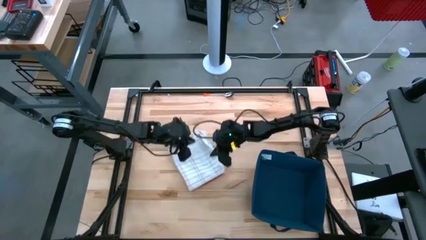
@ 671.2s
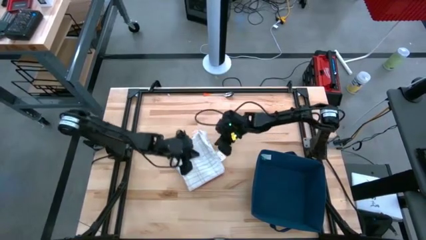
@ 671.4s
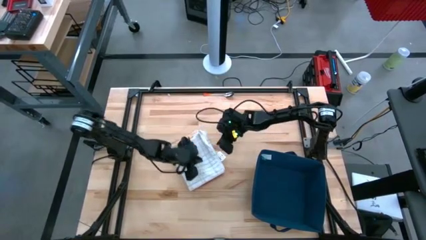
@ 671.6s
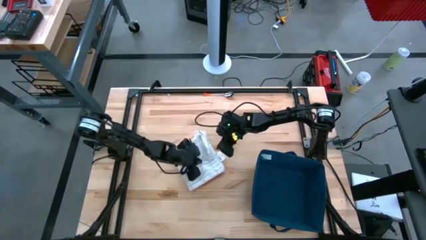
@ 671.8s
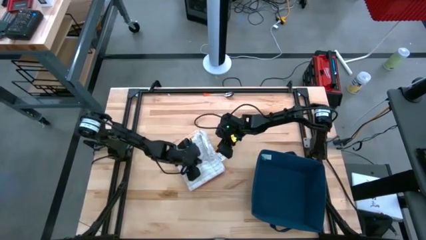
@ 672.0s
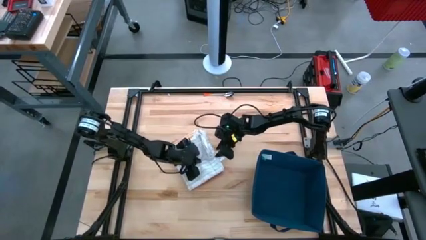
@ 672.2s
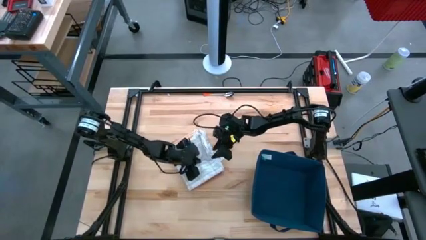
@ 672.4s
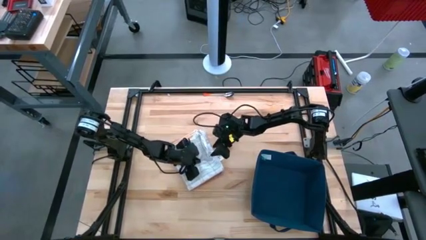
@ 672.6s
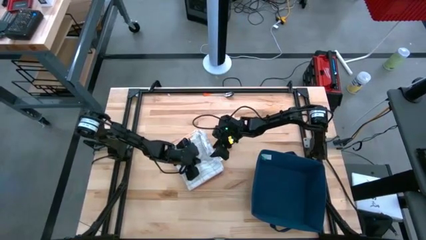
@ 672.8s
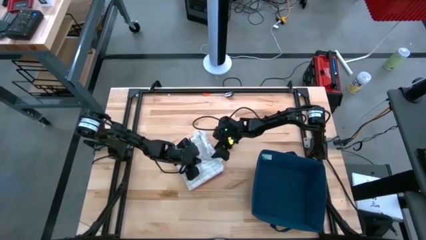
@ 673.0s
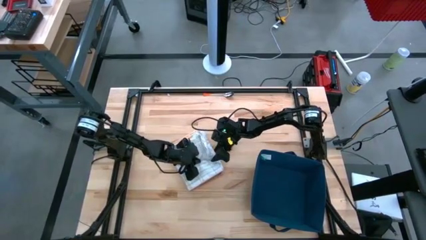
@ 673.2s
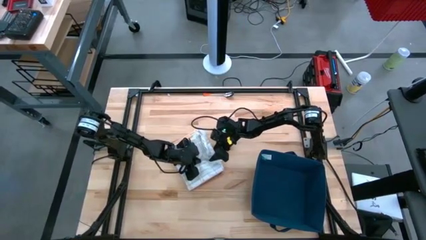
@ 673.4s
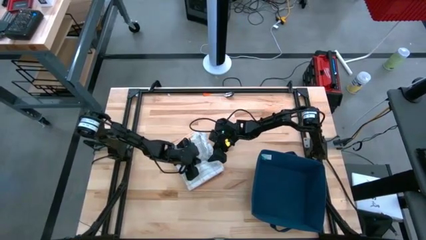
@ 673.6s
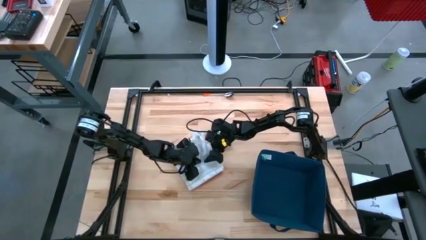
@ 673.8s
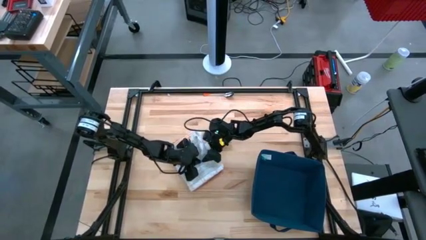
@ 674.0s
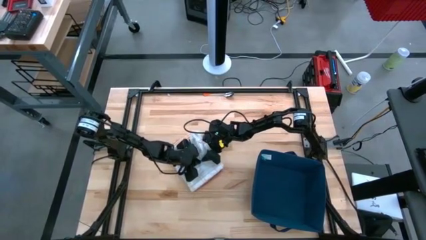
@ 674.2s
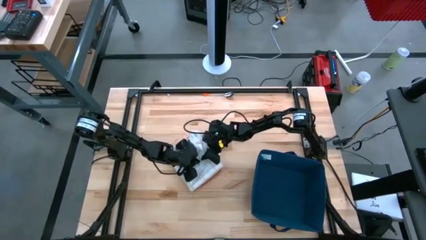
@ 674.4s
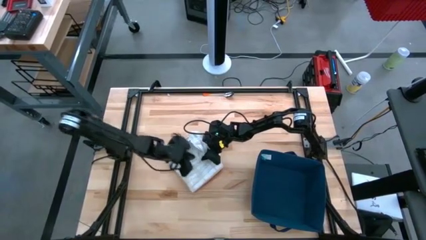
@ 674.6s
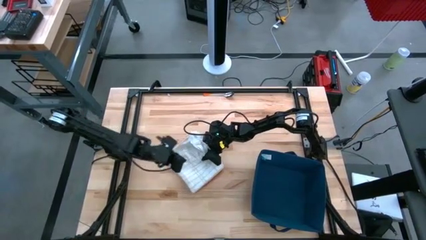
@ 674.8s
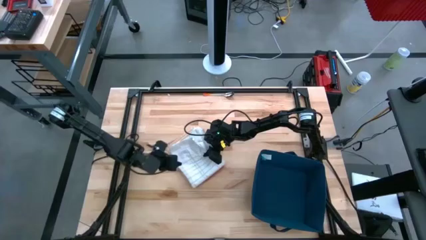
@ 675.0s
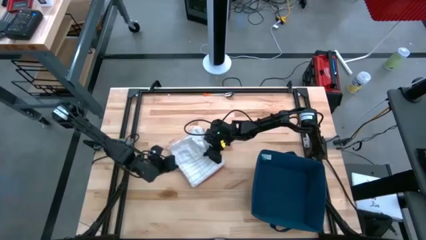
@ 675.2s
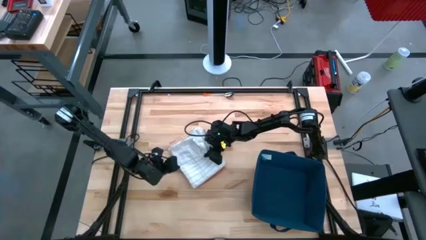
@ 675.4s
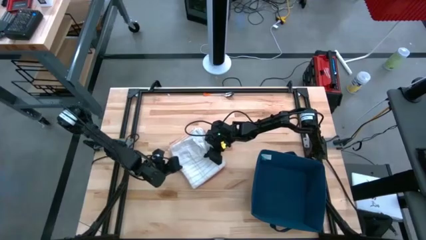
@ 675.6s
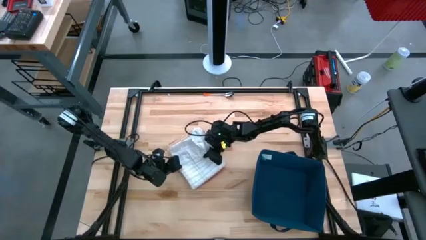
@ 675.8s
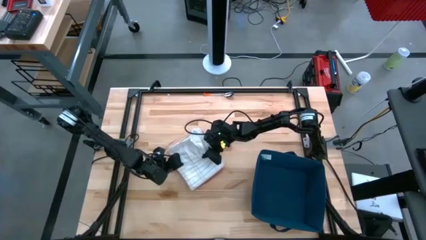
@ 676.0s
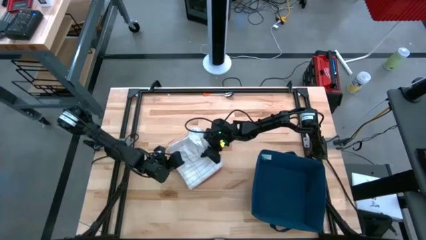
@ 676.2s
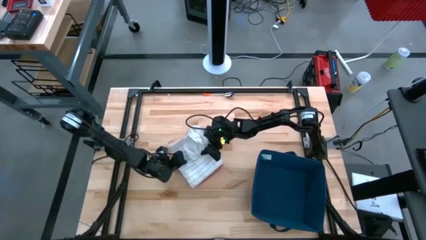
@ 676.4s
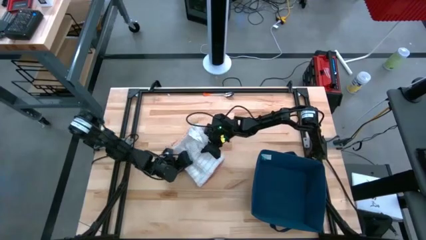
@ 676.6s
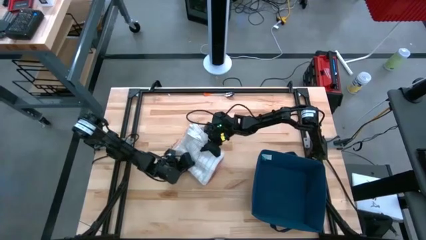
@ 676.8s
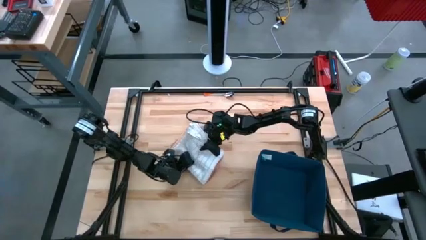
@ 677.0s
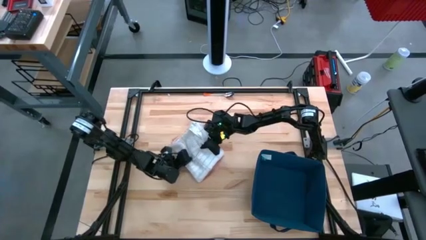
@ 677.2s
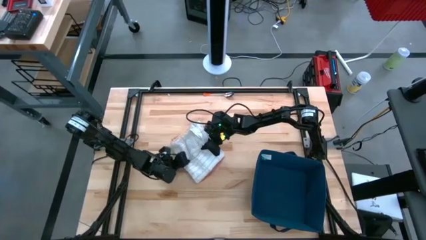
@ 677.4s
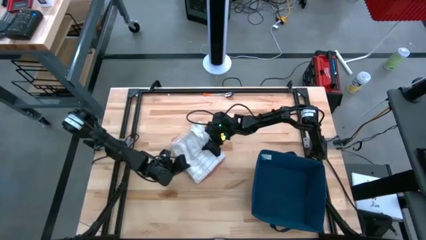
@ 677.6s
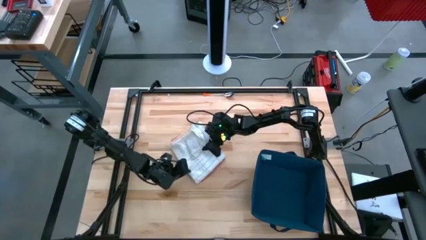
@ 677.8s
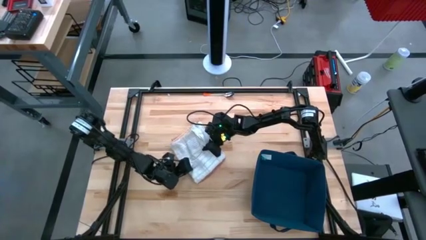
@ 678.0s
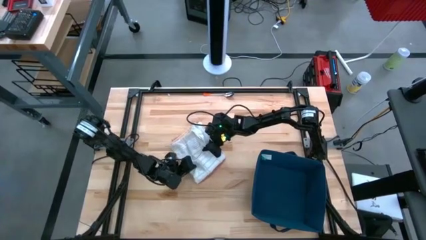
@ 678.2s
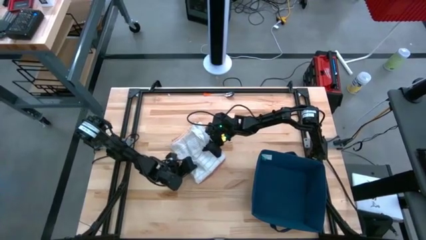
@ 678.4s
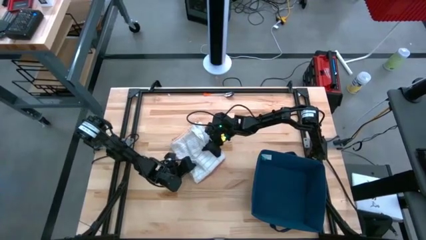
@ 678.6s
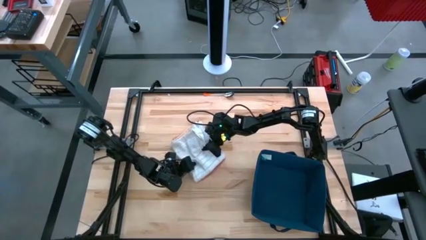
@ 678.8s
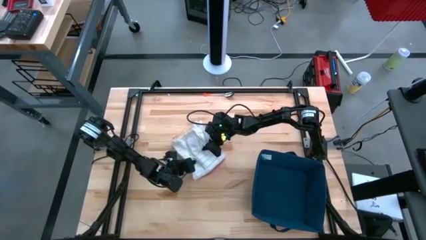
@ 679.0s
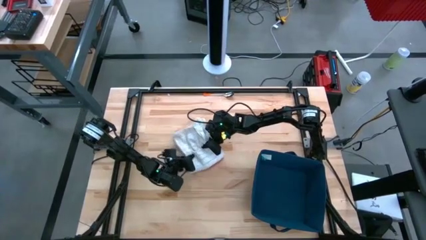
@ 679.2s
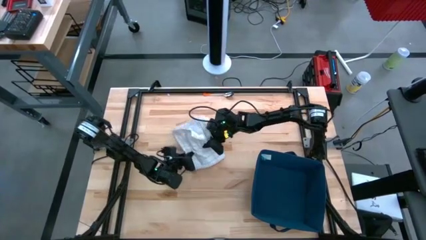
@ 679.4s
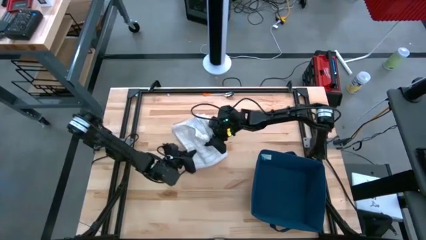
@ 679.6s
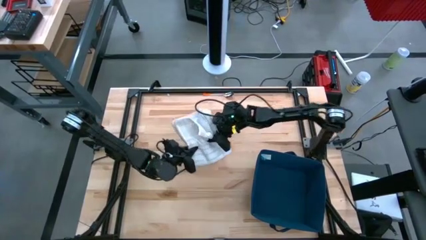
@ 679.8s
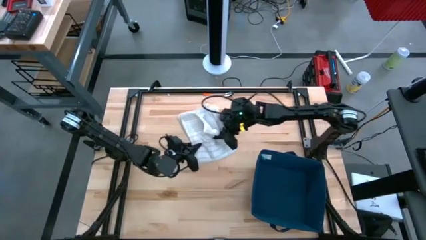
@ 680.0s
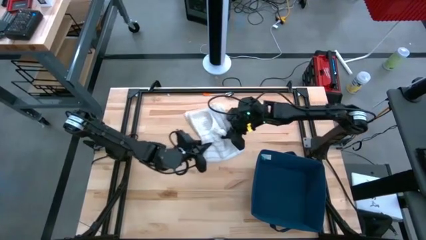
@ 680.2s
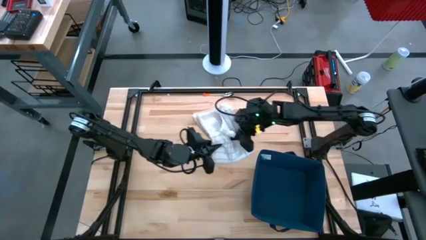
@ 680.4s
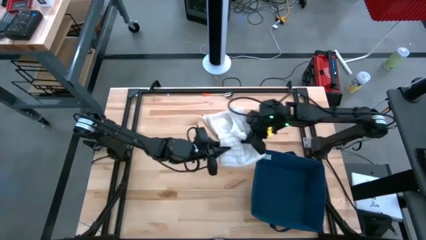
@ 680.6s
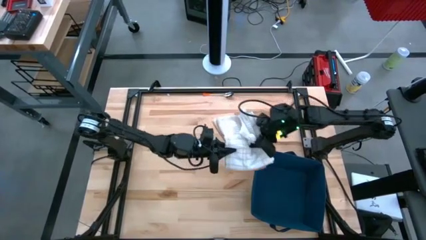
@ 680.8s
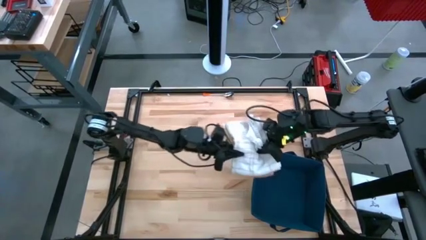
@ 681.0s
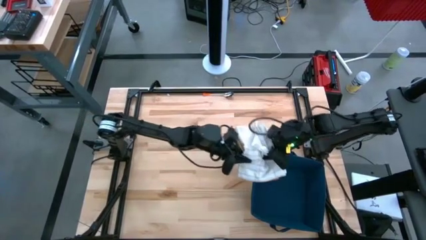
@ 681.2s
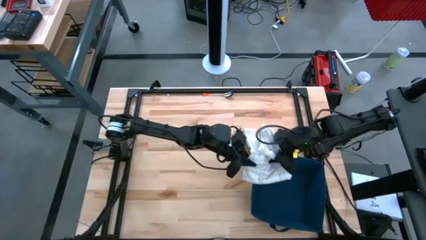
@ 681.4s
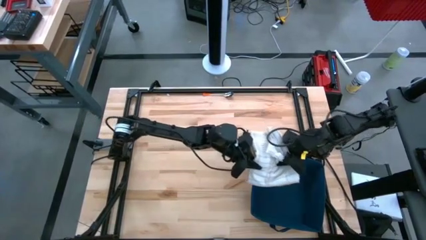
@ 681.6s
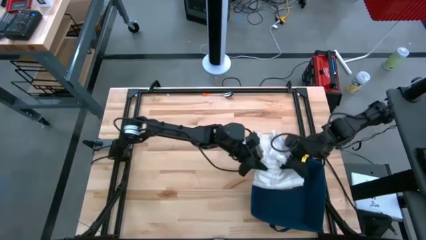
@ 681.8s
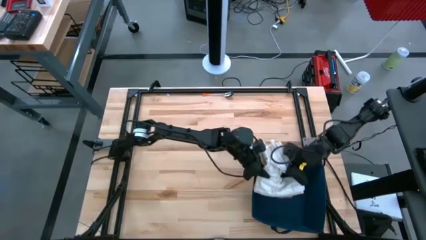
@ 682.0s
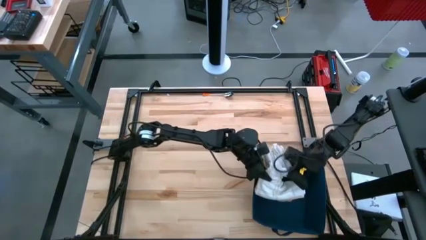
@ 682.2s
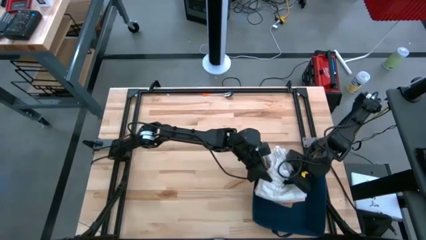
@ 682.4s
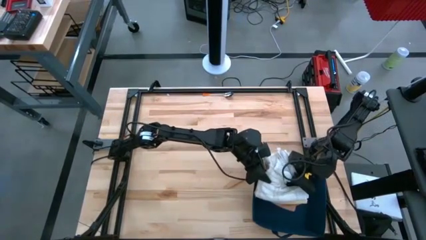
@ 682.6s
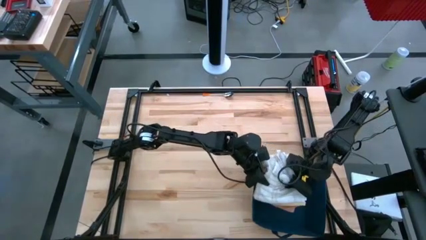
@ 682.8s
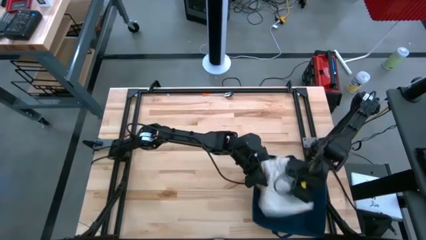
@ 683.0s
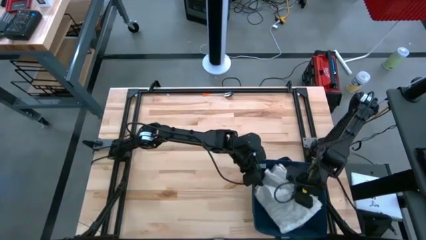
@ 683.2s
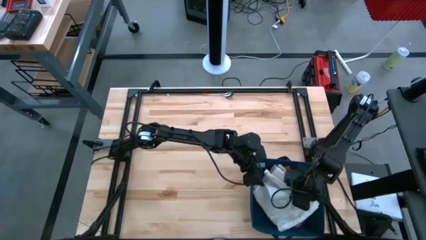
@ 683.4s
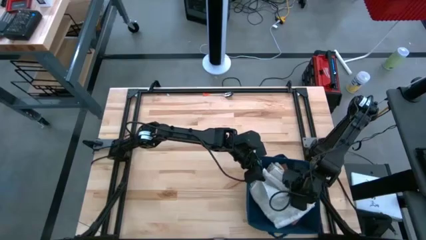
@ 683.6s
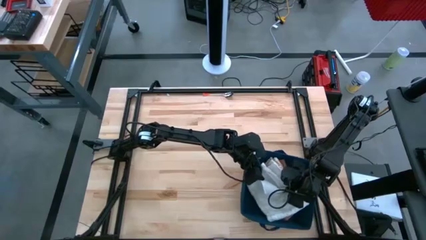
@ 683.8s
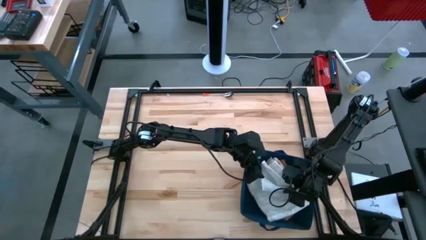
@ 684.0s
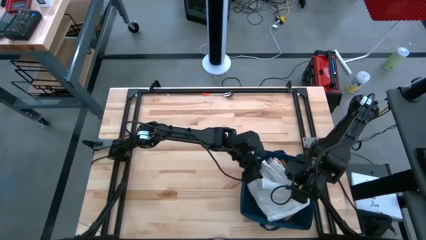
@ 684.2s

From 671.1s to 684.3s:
Task: Fold towel
Put the stacked folded towels into the laundry bin
